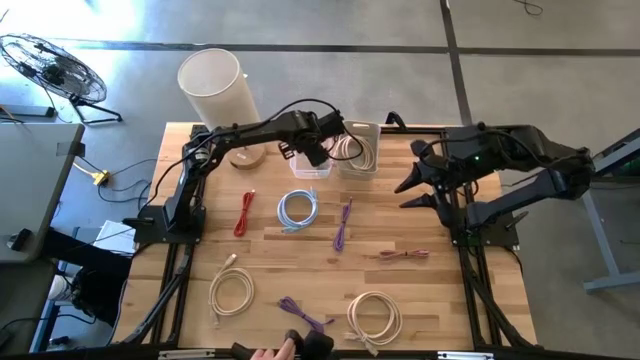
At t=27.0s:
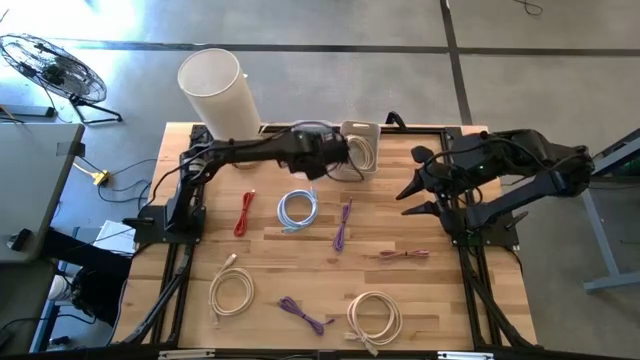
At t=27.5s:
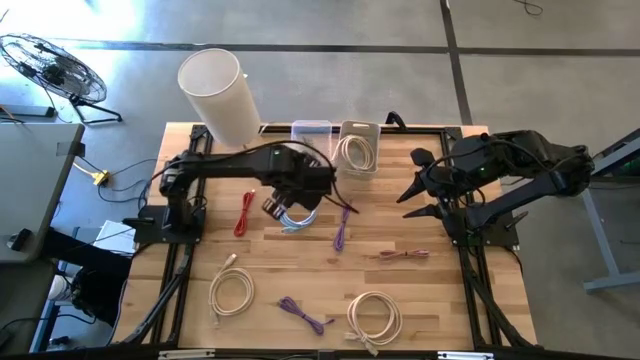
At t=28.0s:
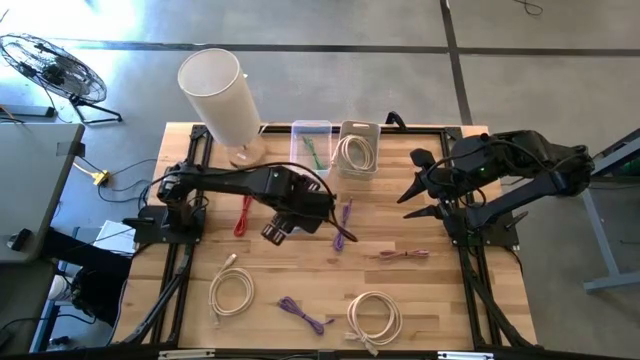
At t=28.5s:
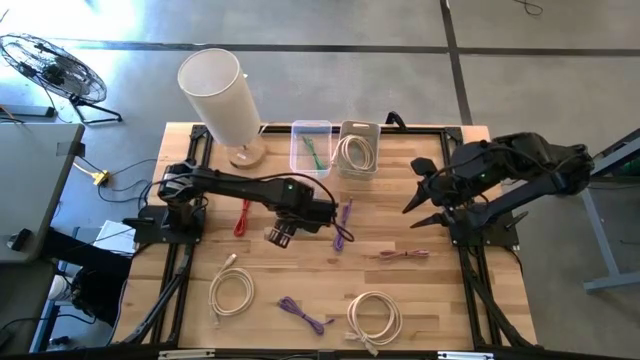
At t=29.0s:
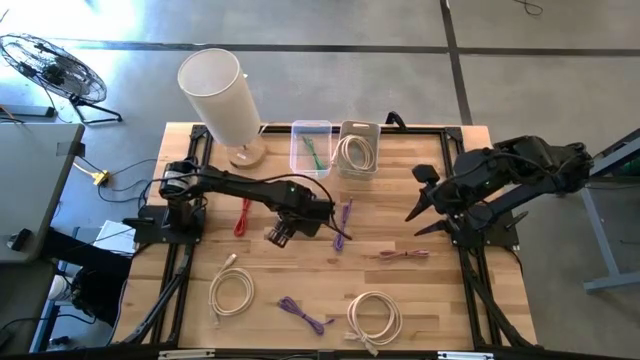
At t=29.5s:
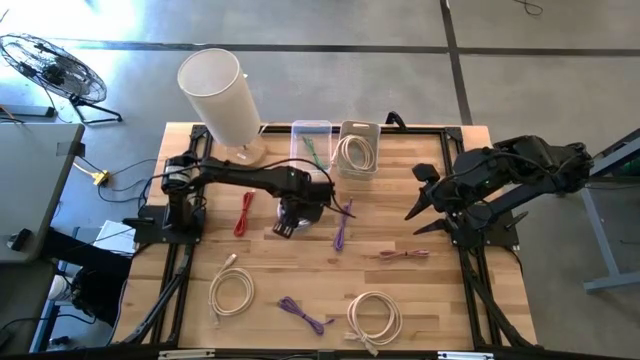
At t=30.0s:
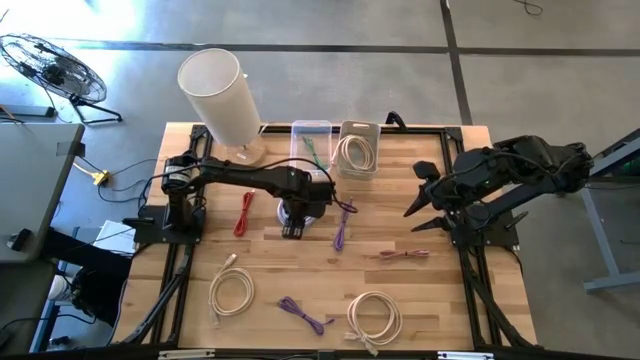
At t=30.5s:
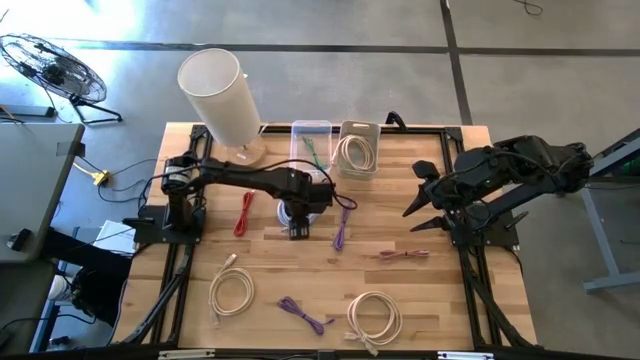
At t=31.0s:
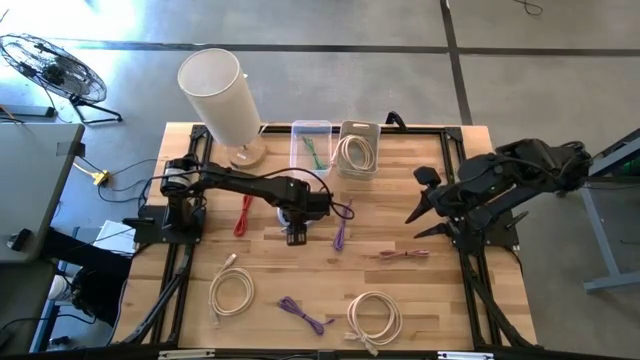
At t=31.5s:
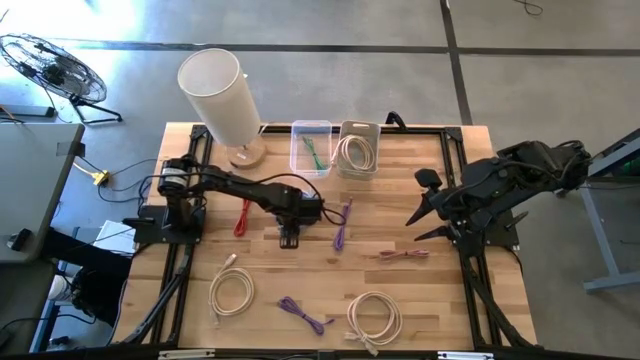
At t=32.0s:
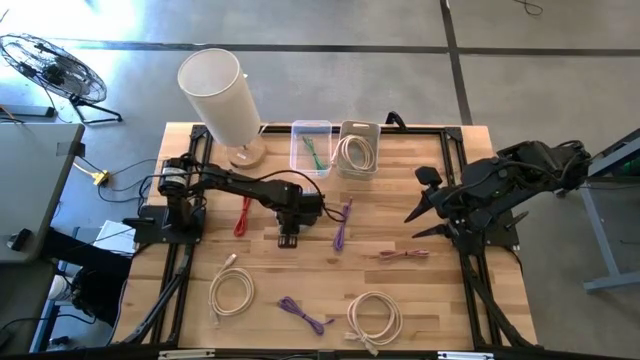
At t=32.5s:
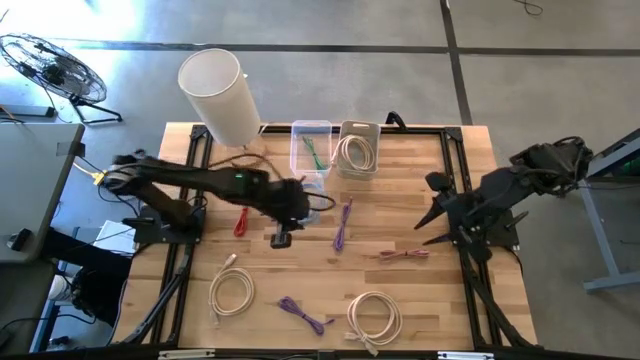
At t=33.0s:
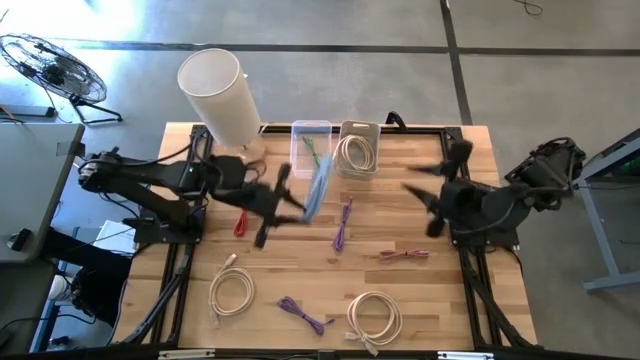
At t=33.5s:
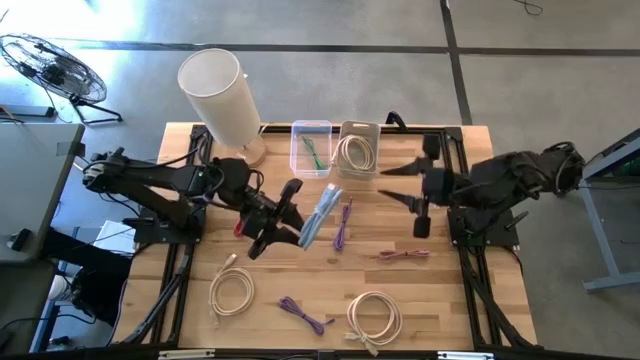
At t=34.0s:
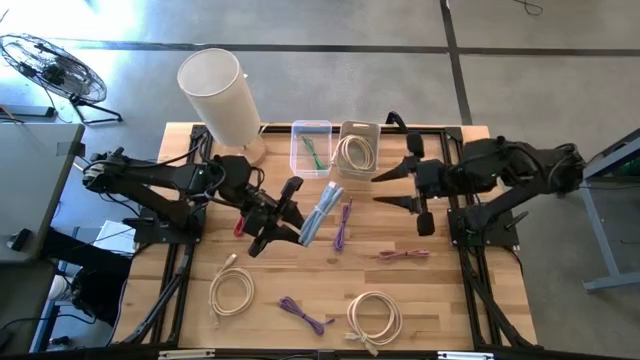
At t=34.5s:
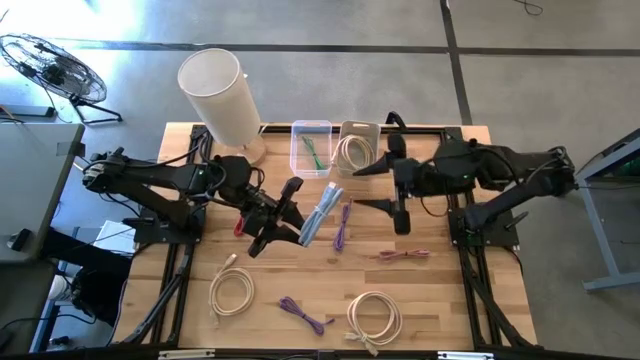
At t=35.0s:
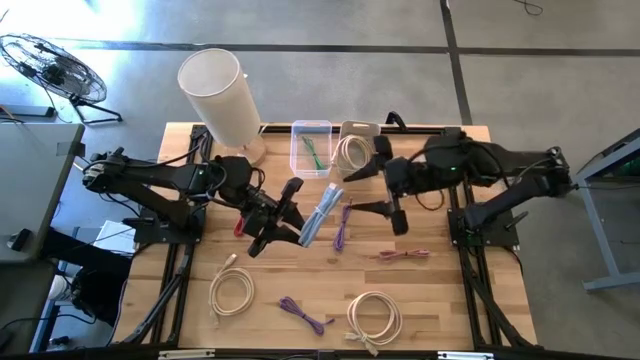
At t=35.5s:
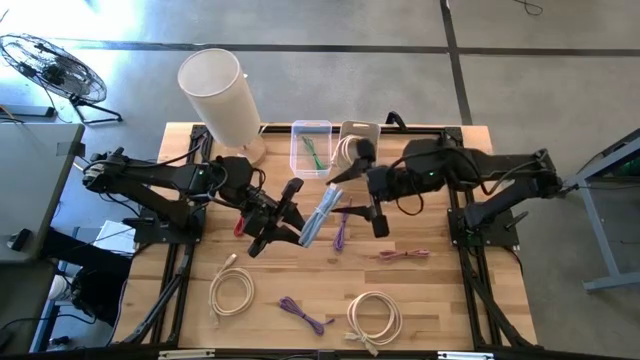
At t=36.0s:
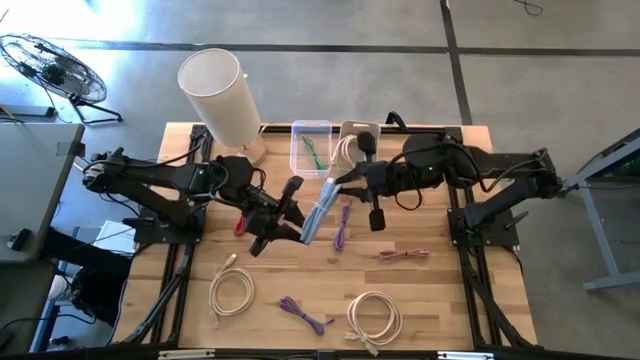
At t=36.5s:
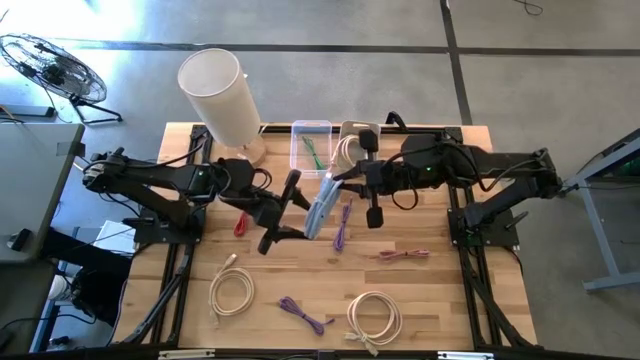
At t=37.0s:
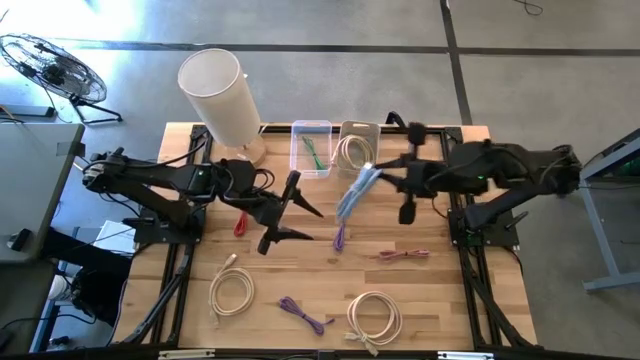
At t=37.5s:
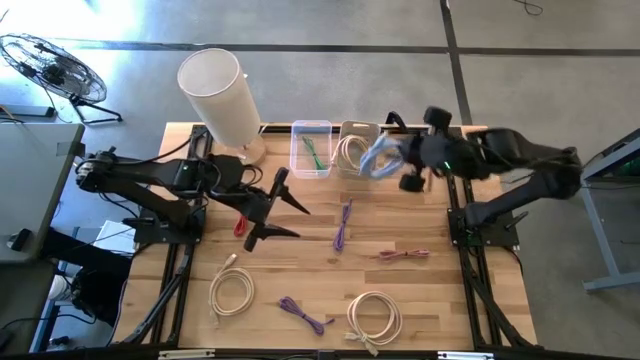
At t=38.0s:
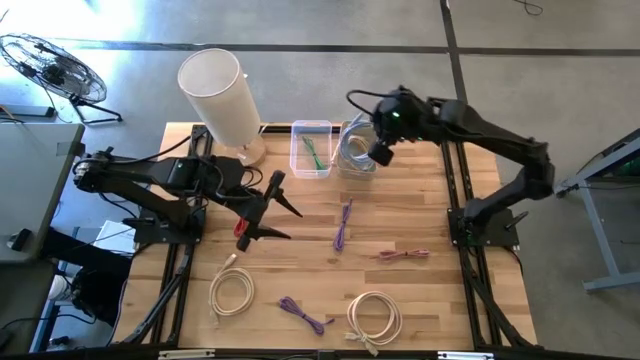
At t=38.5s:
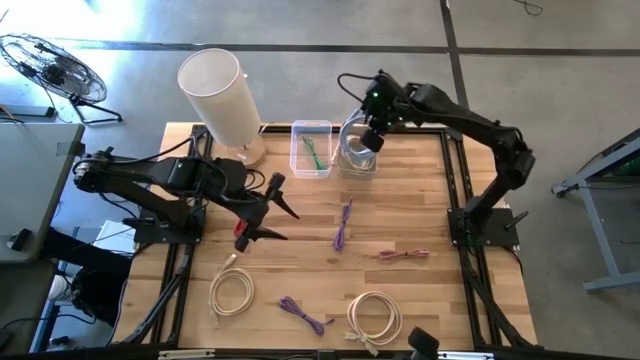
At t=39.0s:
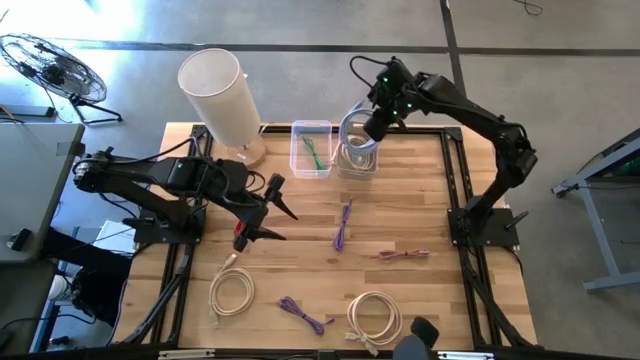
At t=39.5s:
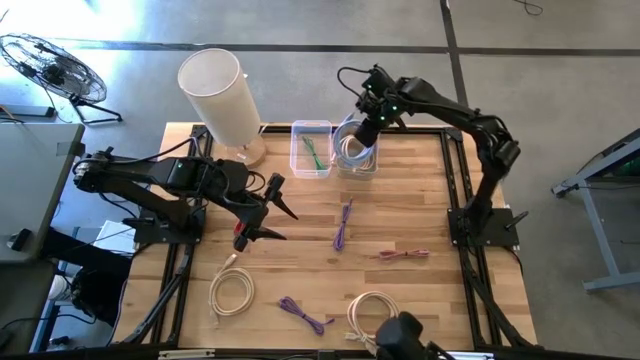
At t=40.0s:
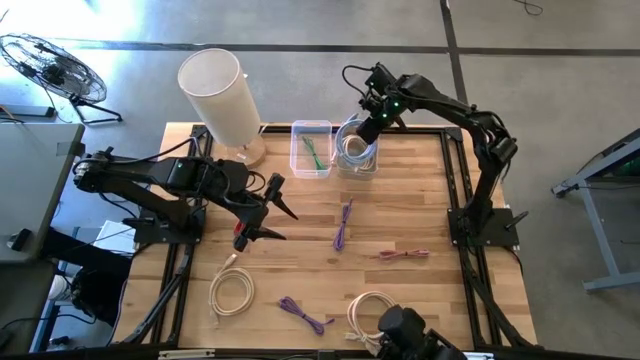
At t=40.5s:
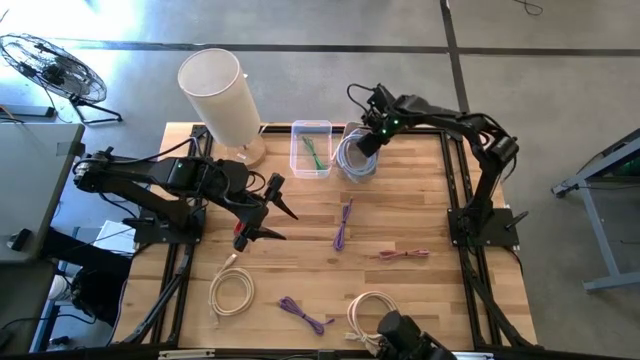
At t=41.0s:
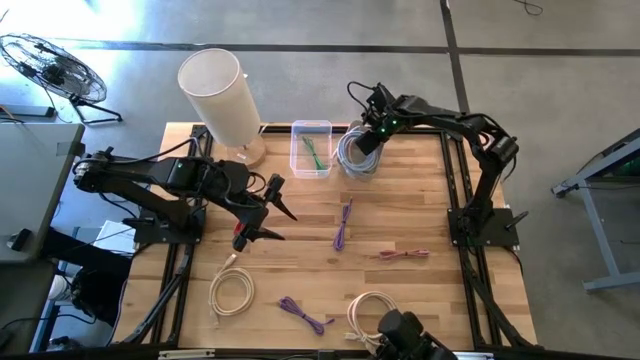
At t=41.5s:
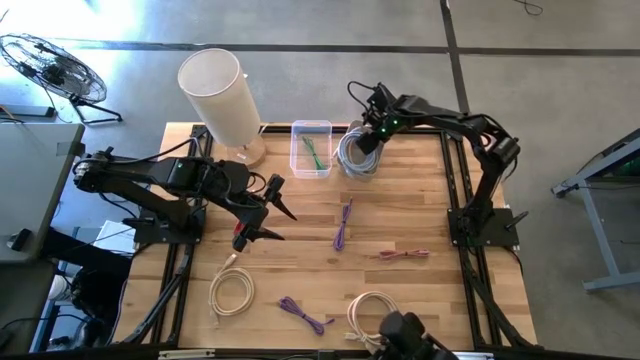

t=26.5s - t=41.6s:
Task: Pick & Place USB Port
Put the blue usb cable into the white bin

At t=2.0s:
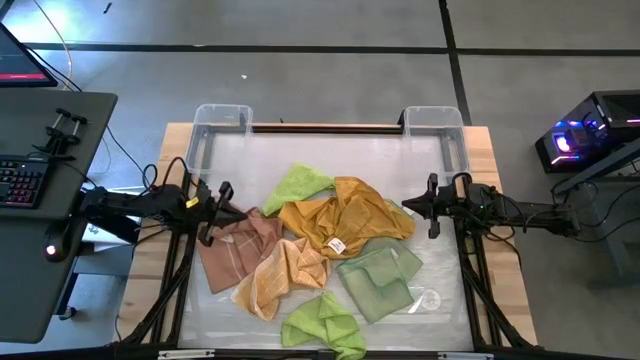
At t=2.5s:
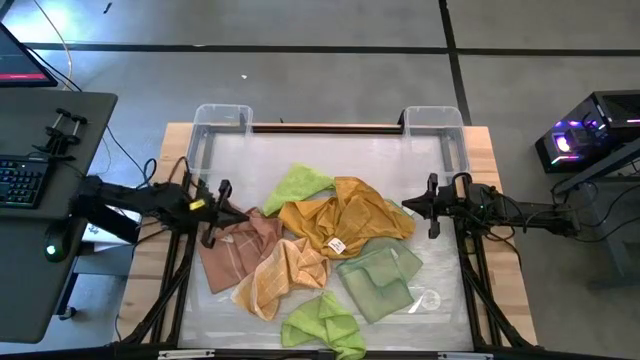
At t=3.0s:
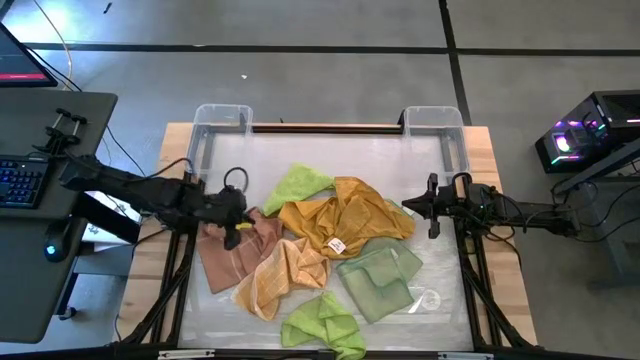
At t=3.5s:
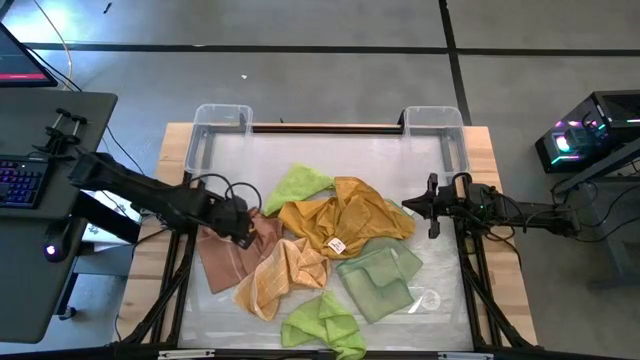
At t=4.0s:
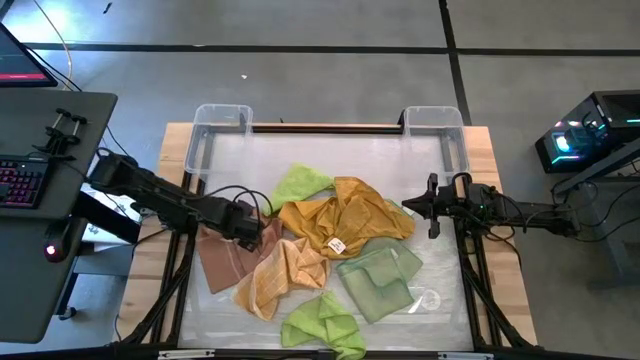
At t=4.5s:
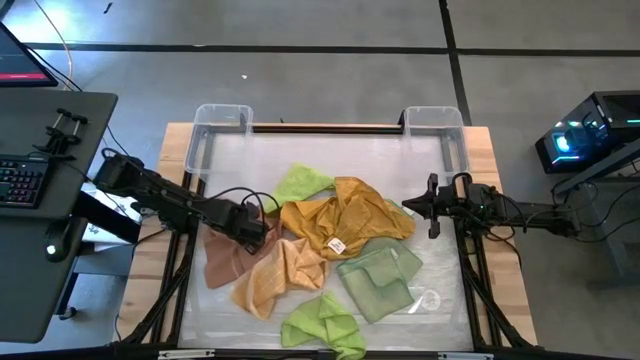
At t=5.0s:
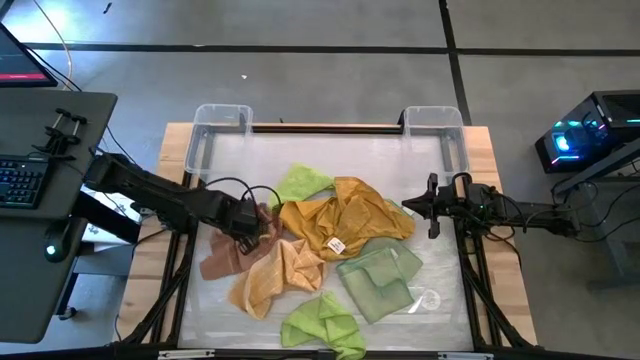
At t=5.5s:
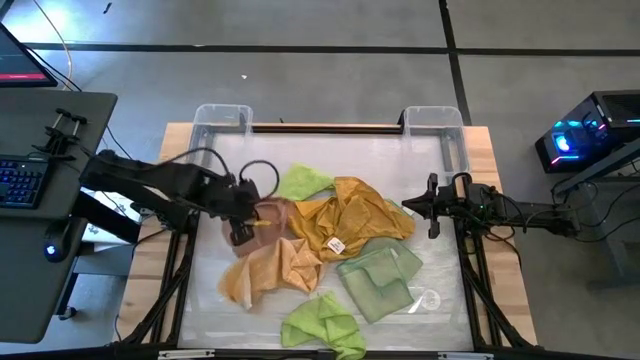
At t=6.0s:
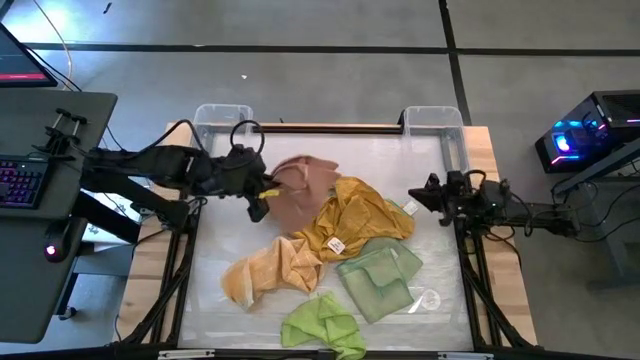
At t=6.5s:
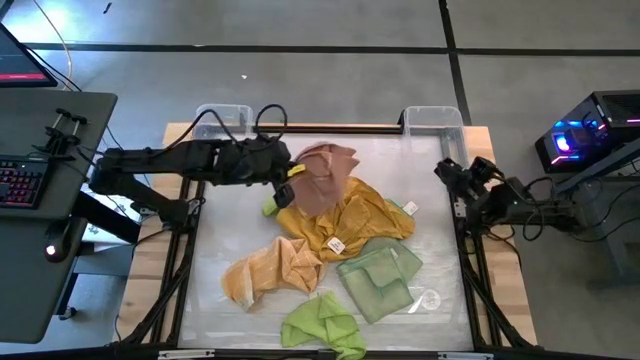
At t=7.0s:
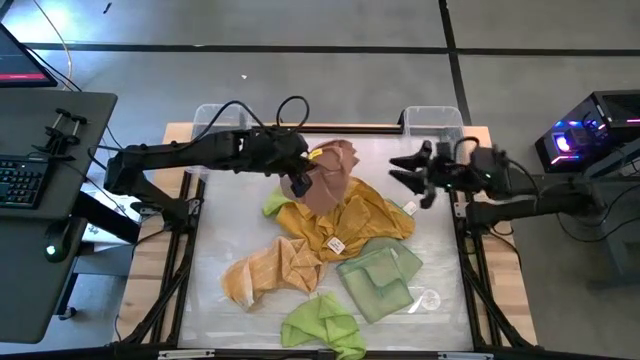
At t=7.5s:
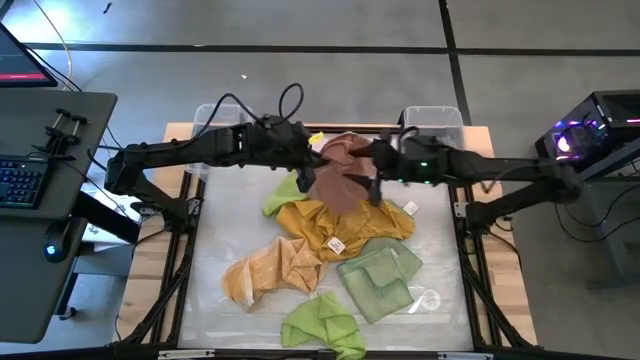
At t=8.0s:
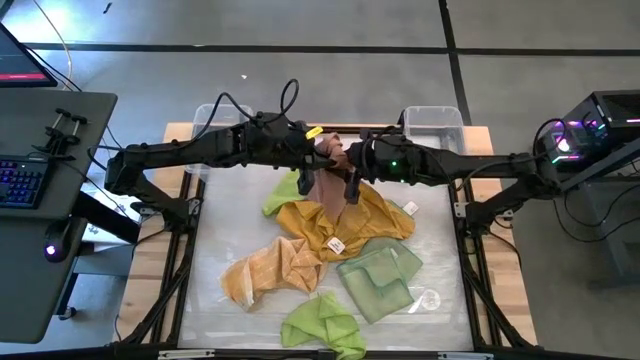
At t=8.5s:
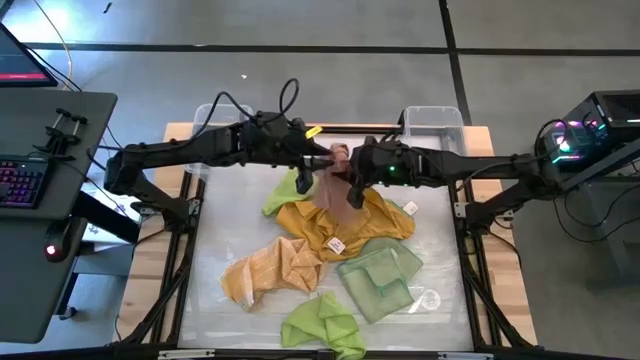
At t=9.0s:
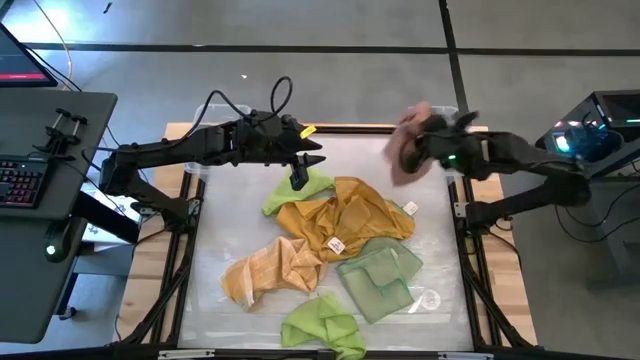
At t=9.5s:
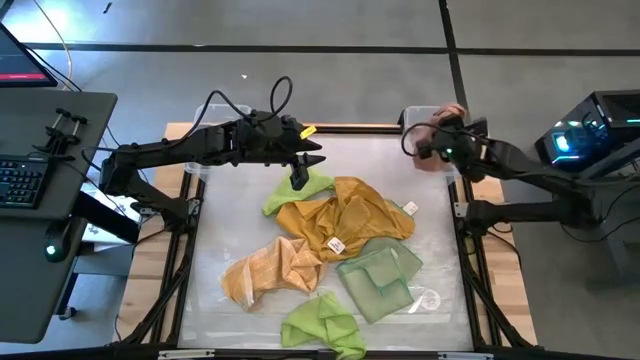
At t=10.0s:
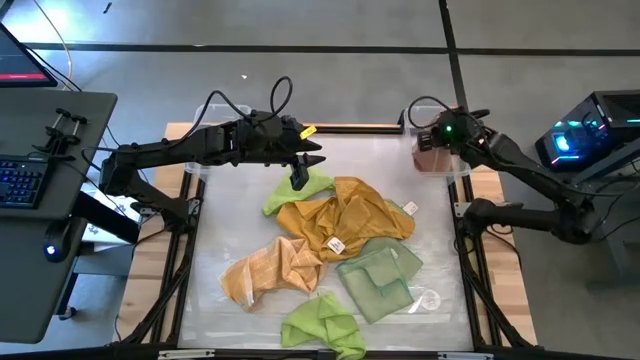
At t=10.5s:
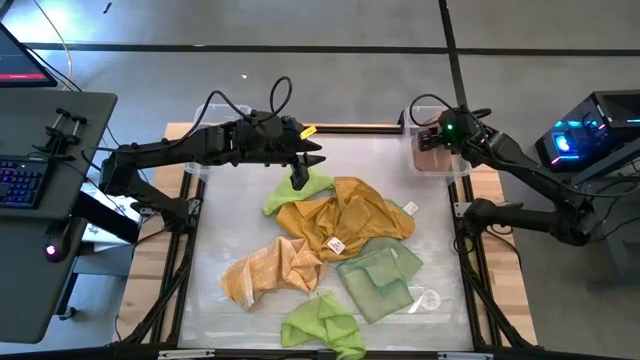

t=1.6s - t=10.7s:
Task: Sort towels by color in basket
Put the brown kitchen towel into the right transparent bin
